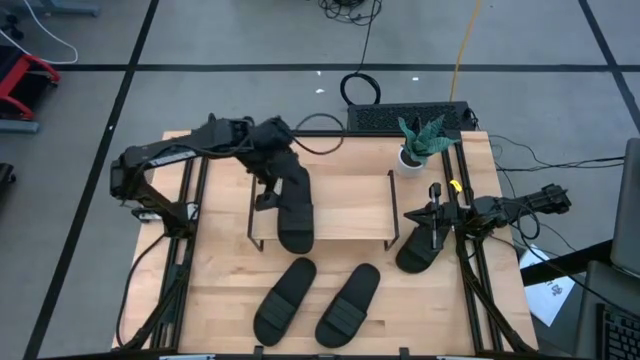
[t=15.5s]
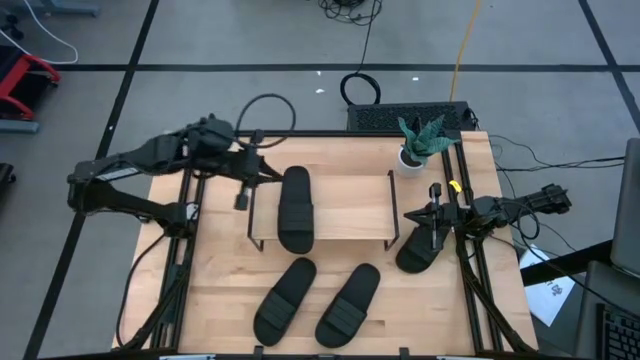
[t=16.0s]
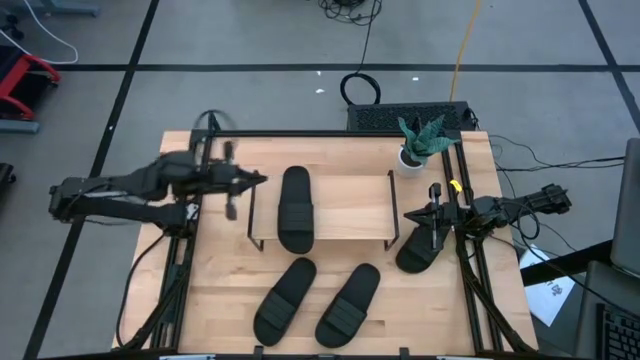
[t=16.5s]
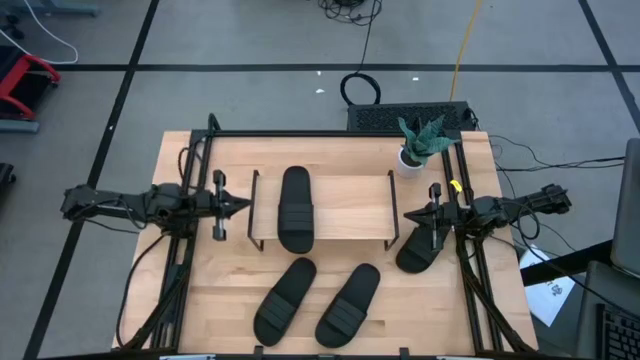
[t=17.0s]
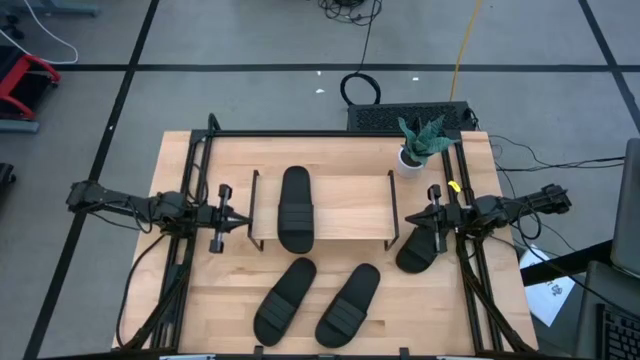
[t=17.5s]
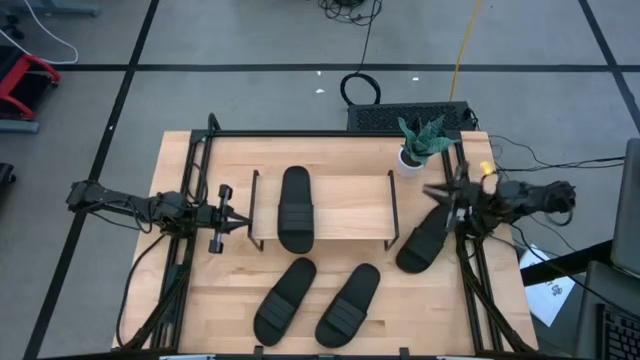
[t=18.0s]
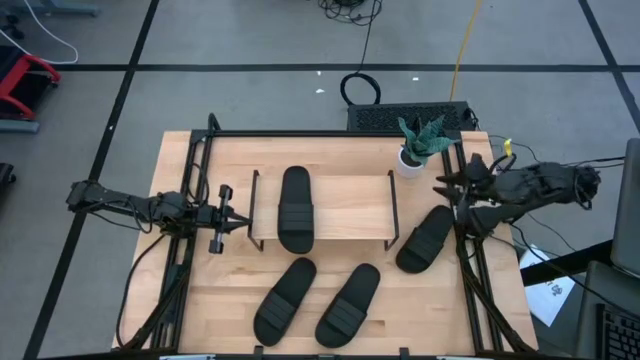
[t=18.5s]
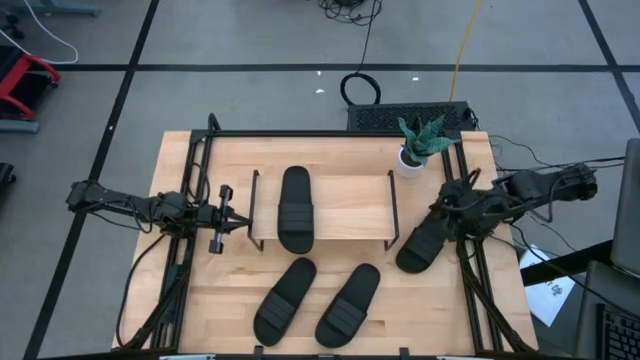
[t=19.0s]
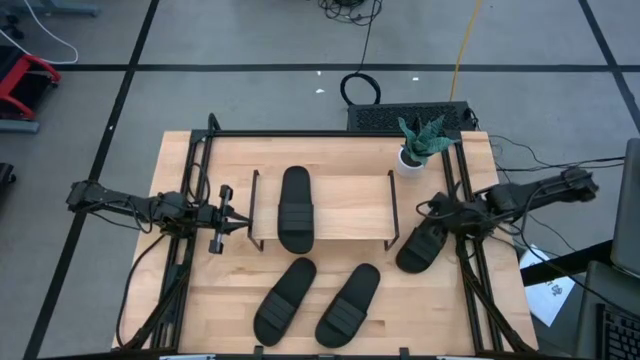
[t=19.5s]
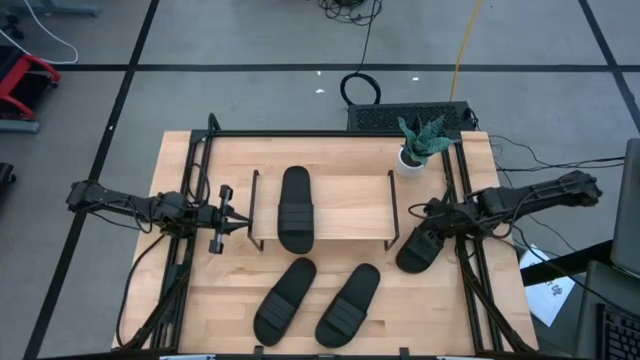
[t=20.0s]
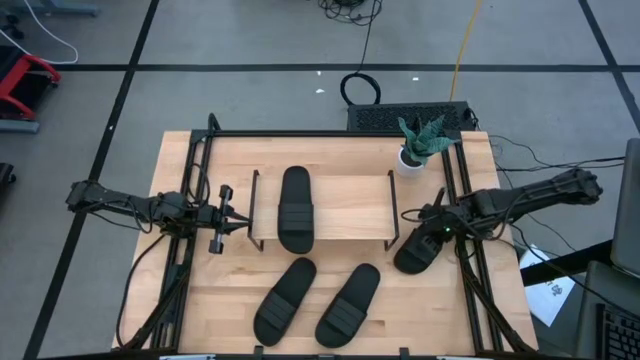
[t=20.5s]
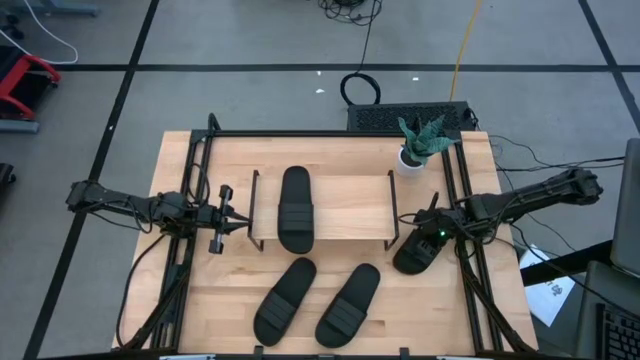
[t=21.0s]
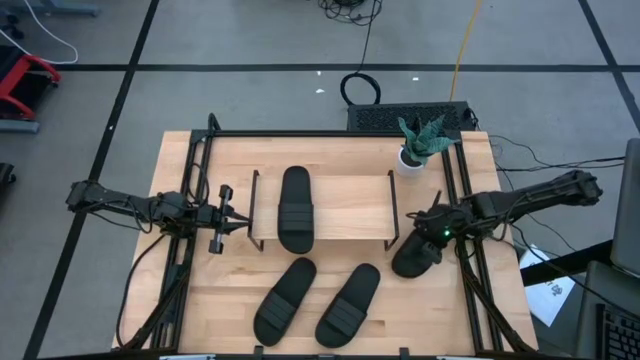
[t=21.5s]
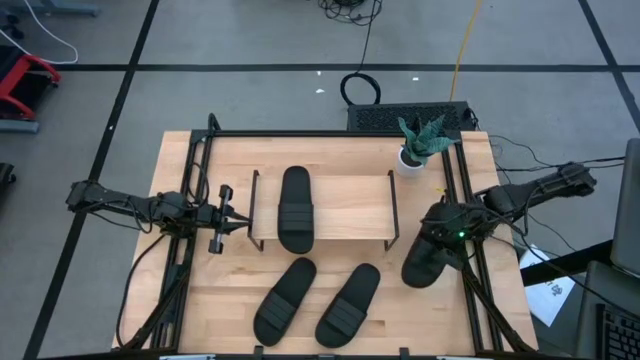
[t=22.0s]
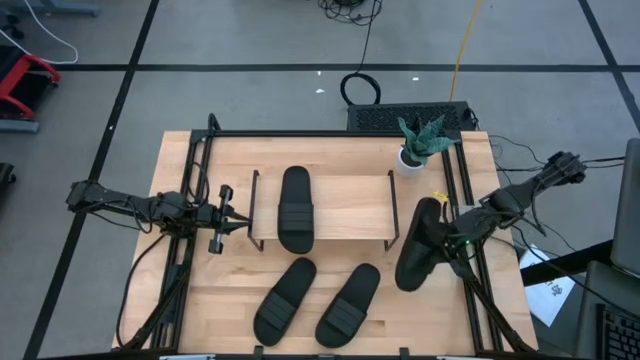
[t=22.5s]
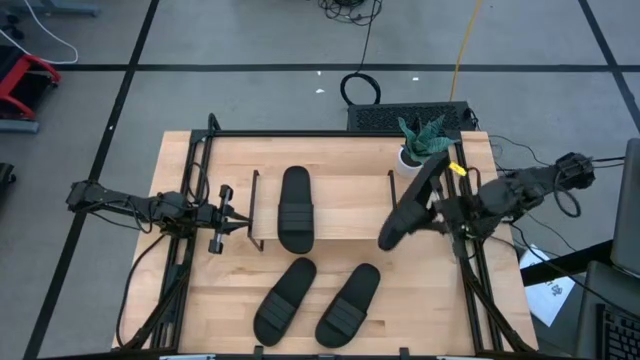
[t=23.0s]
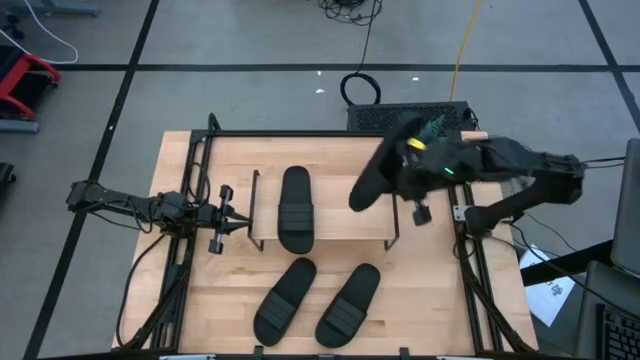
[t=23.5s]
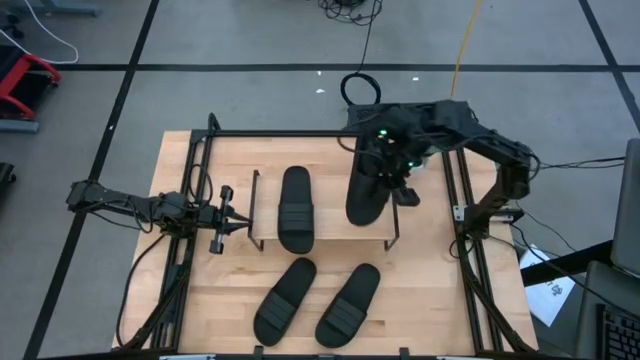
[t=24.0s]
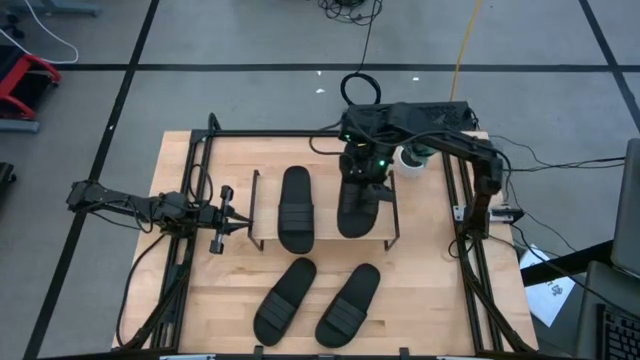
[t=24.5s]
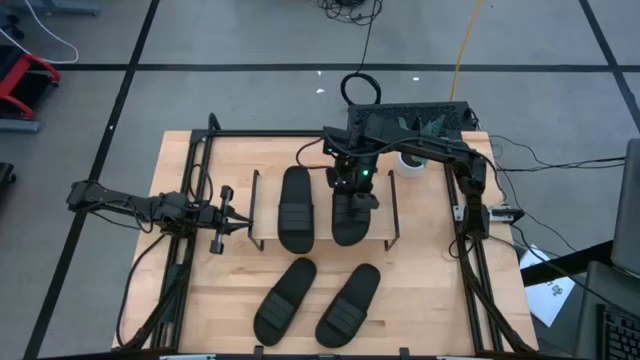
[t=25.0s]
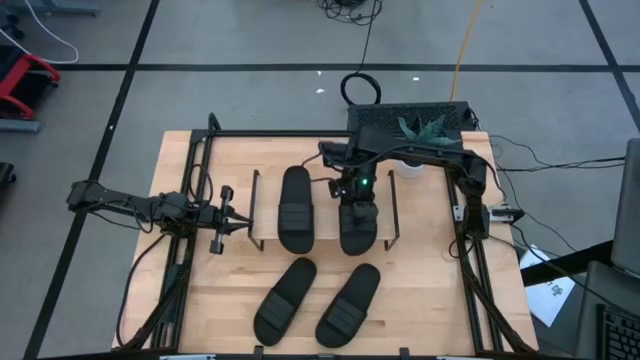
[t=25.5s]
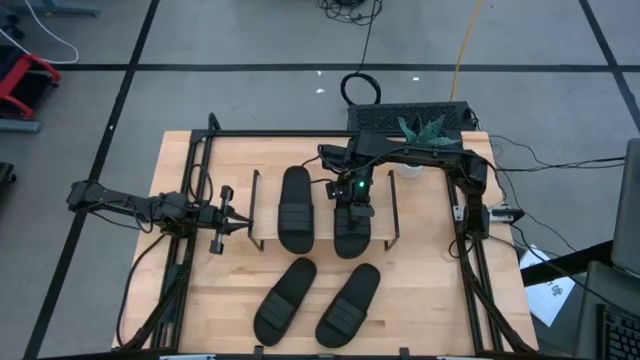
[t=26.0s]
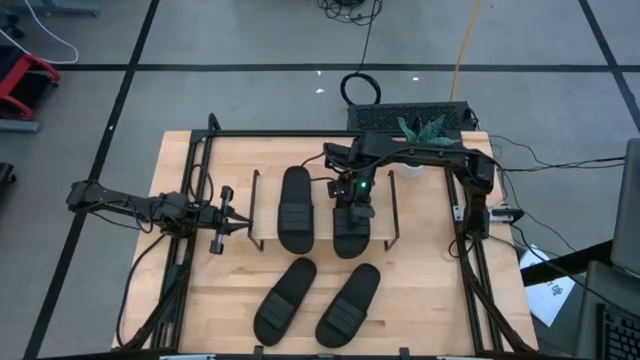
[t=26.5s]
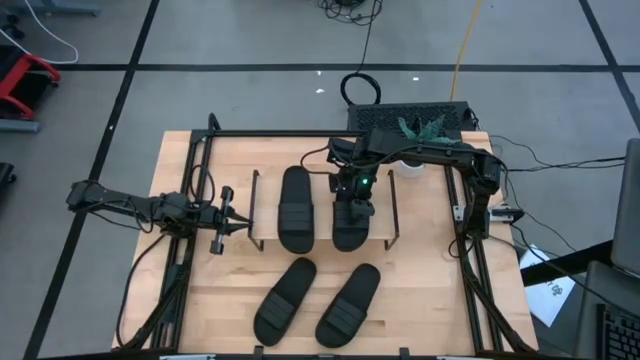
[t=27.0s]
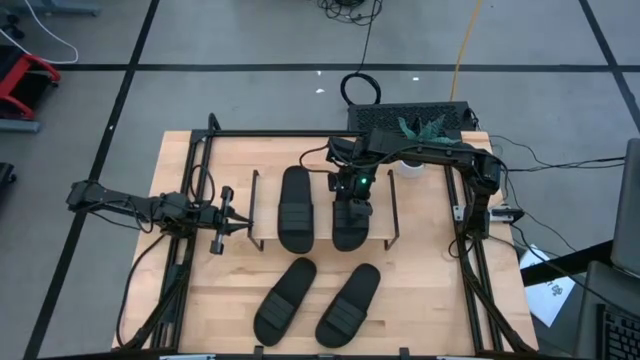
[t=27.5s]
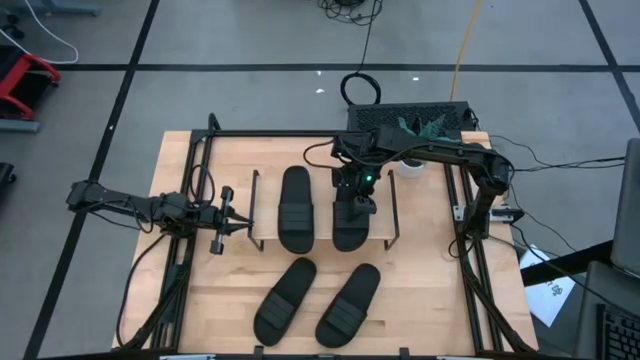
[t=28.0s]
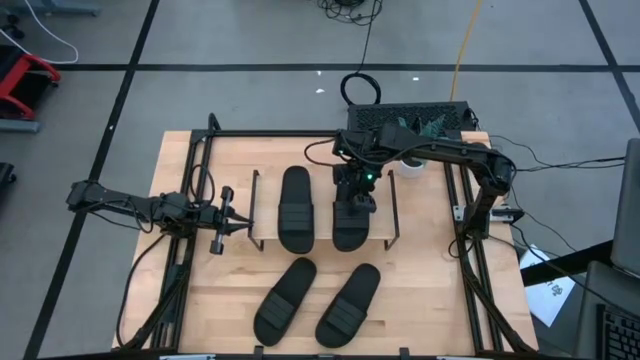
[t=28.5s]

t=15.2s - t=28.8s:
Task: Pick and place slides into the shelf
Put the top black slide on the shelf

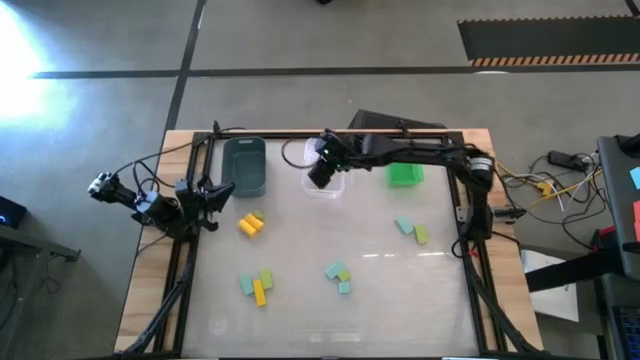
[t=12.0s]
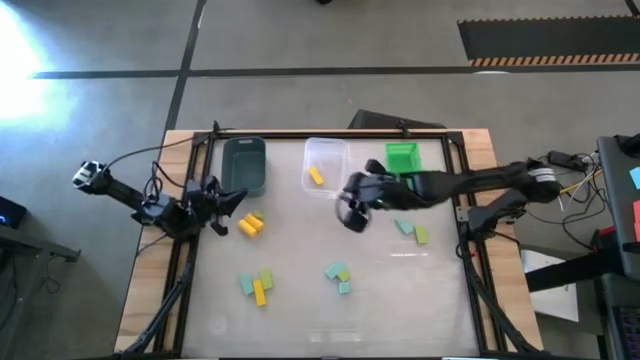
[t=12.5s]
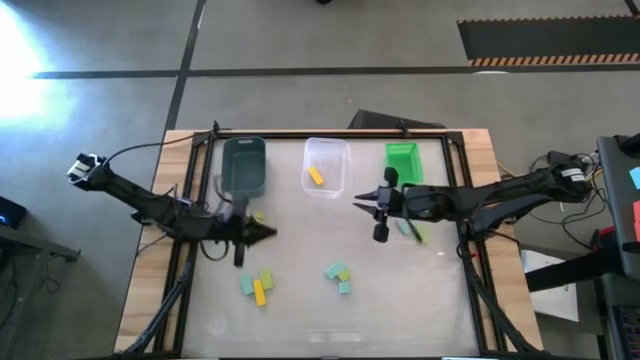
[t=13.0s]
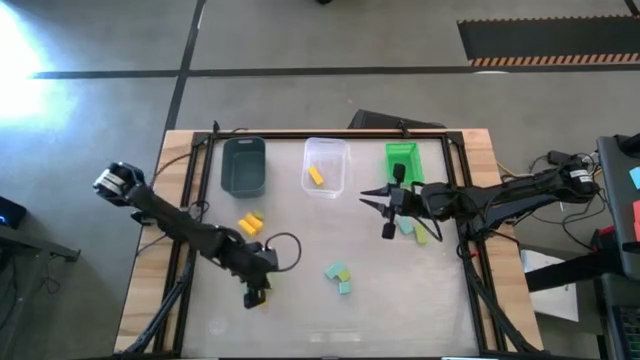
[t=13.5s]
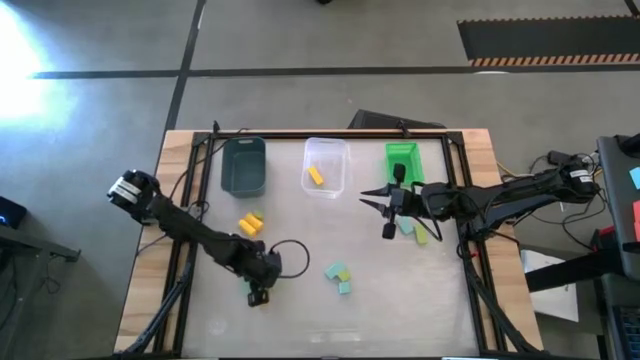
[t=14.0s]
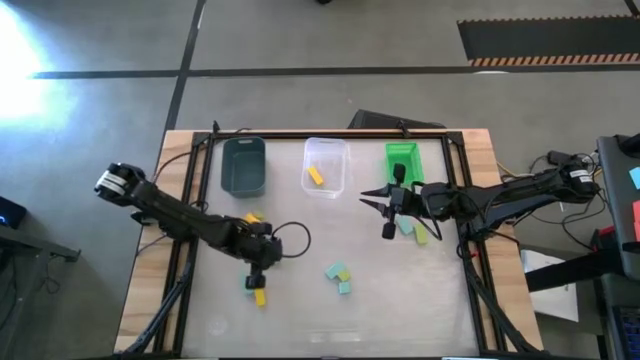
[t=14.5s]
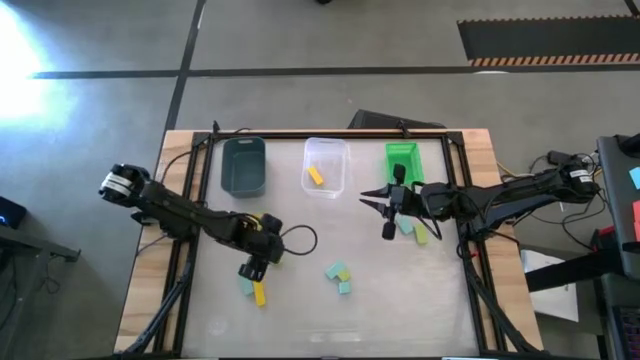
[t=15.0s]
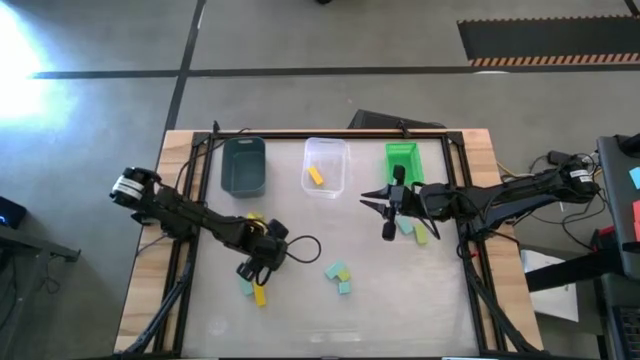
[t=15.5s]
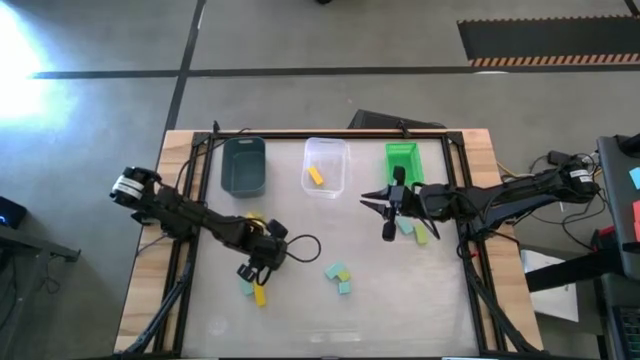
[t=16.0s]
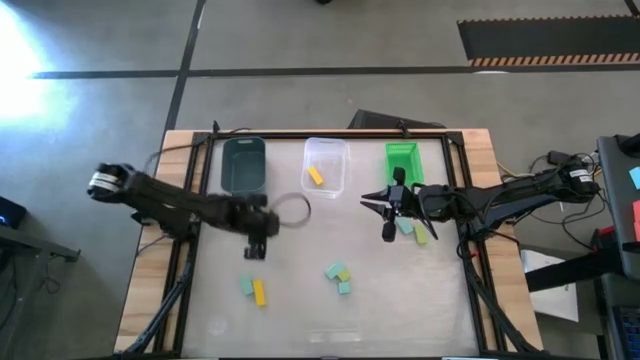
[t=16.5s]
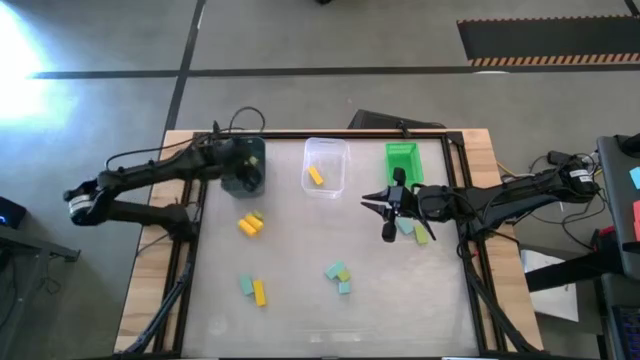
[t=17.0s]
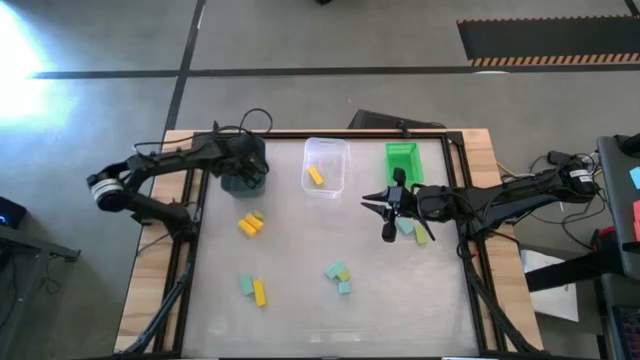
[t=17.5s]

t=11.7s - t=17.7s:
Task: Sort & place blocks by color
Put the green block into the blue bin
